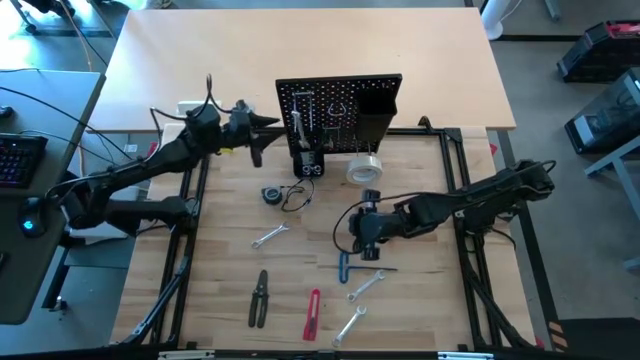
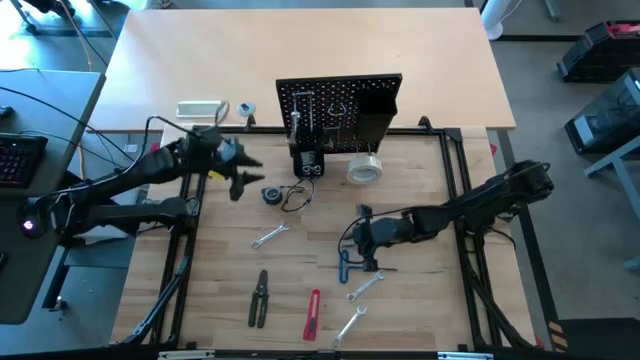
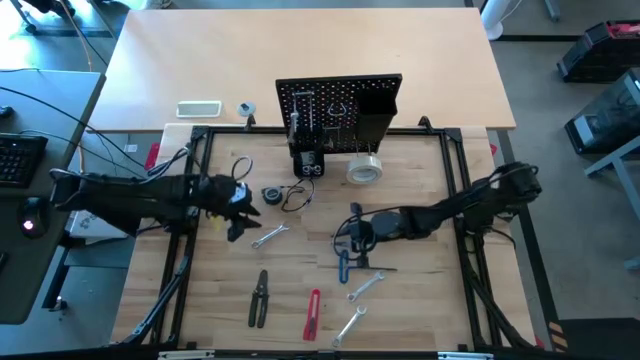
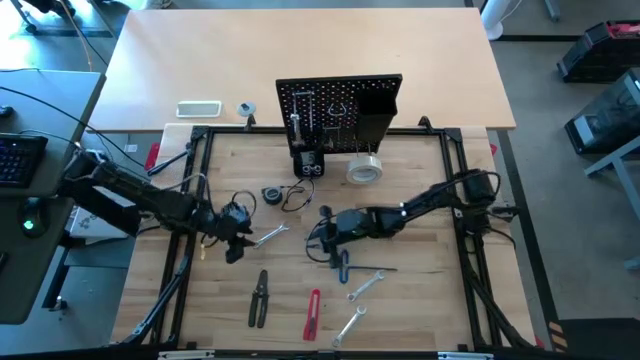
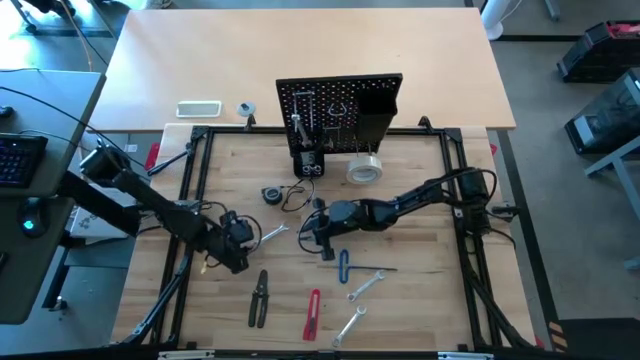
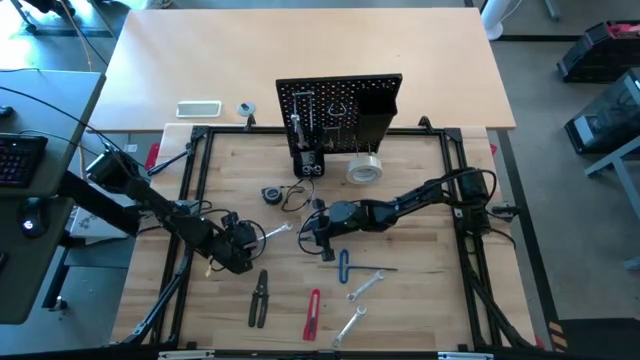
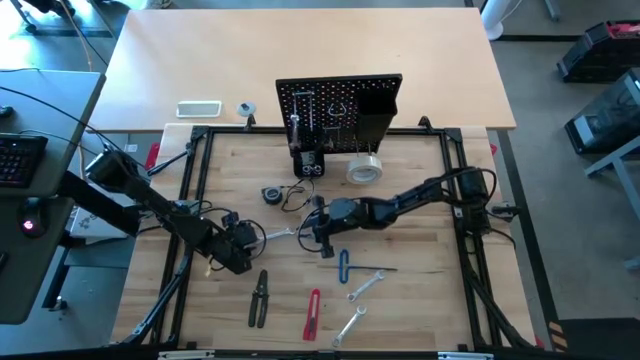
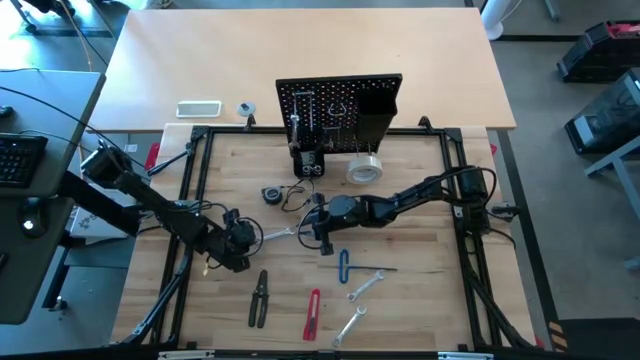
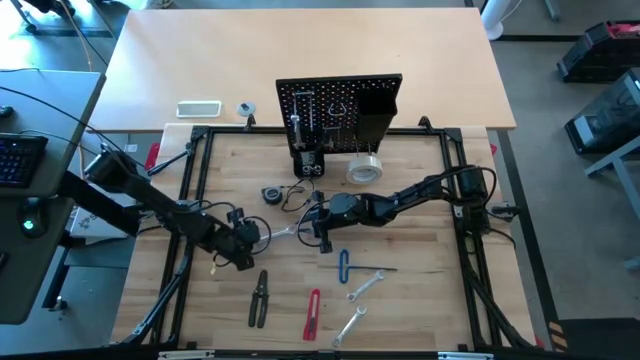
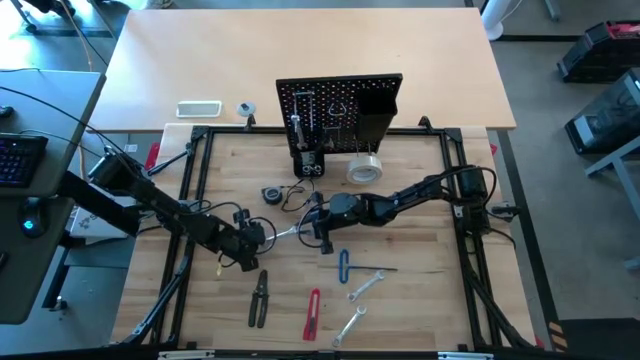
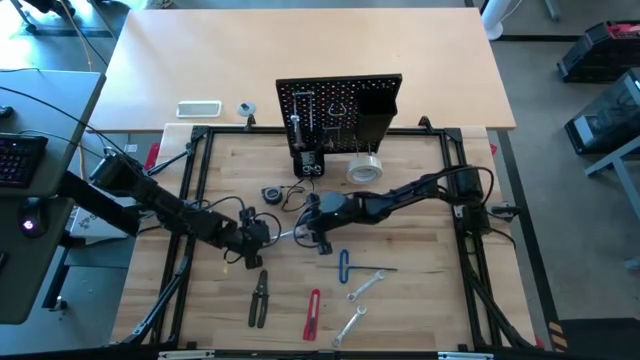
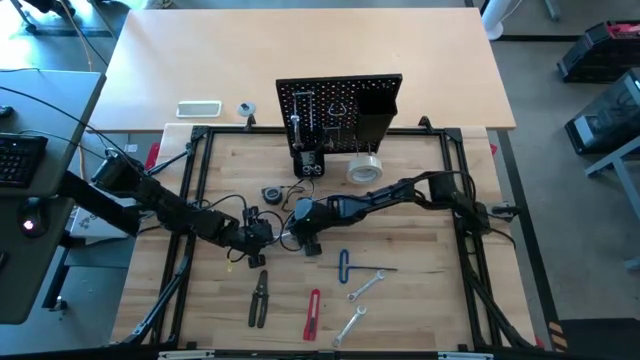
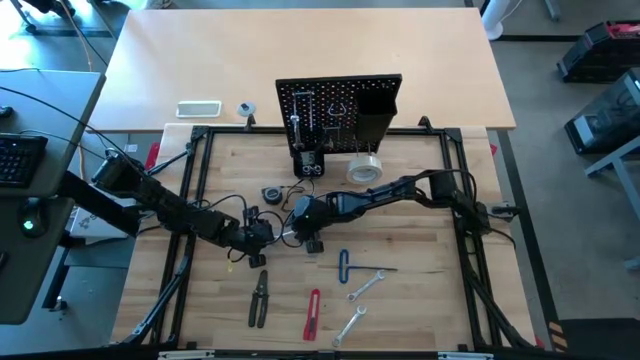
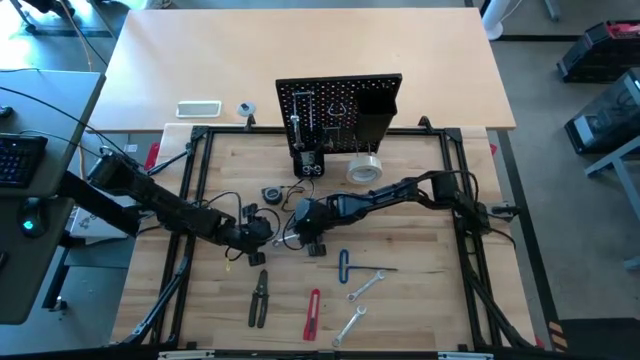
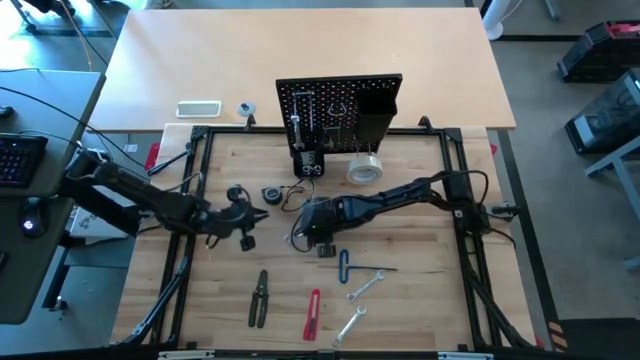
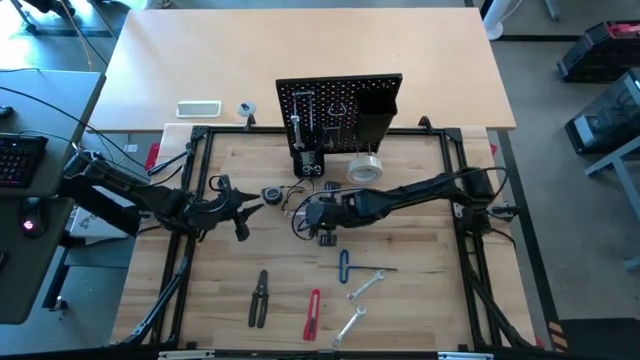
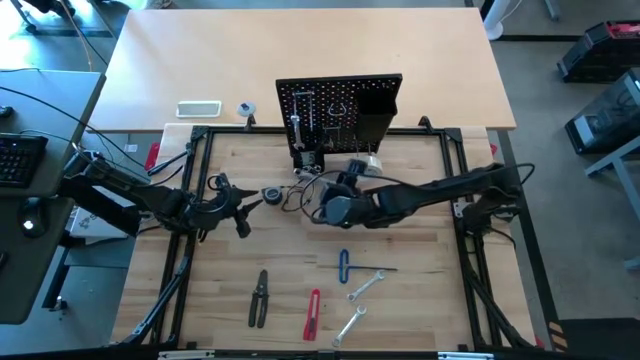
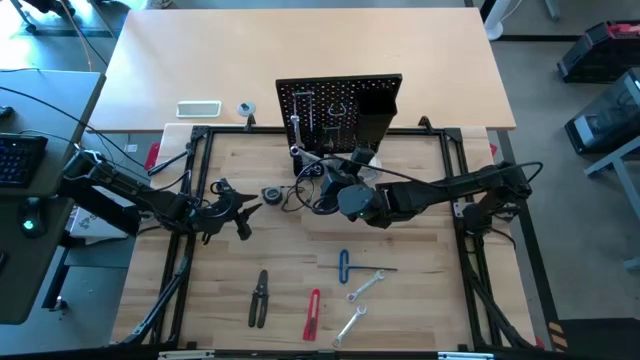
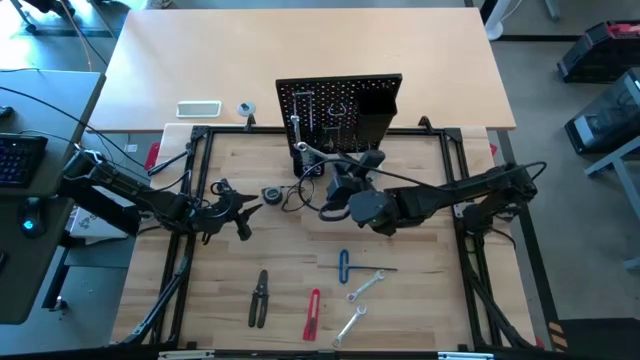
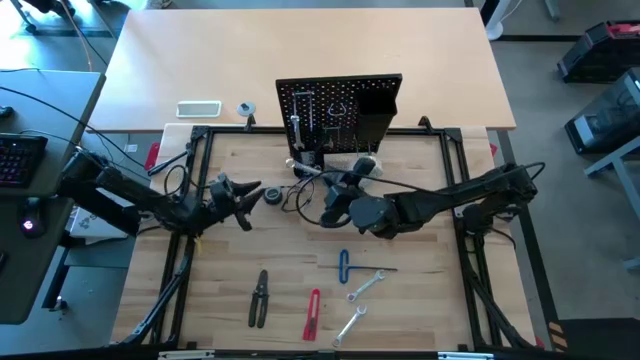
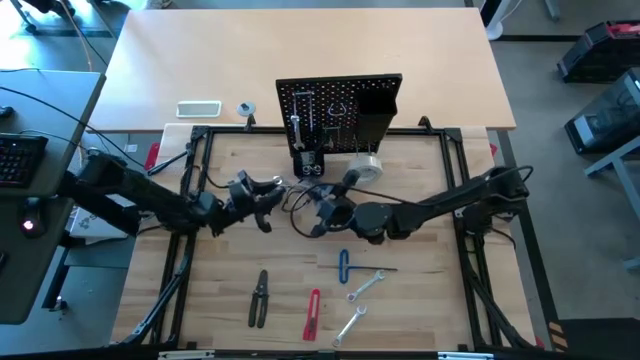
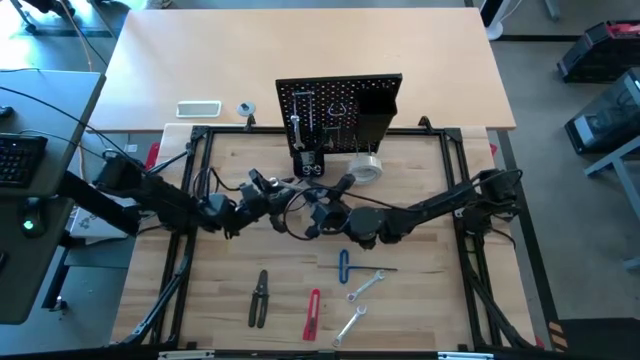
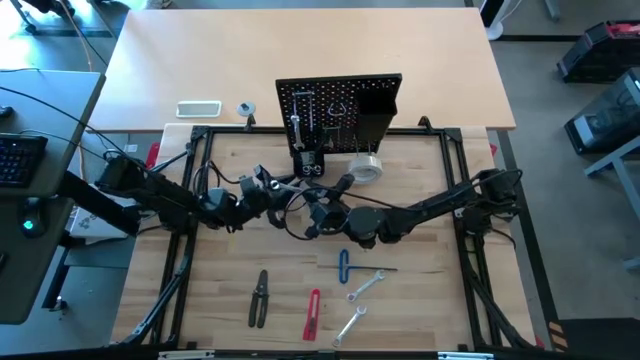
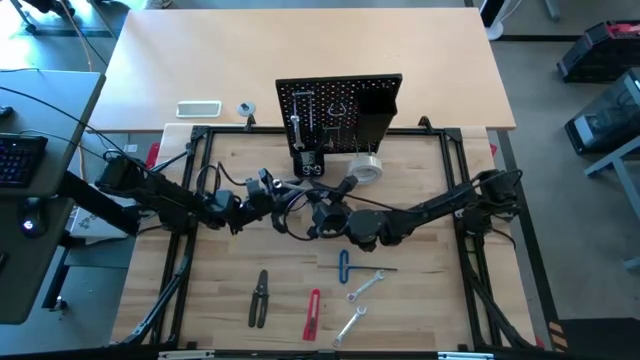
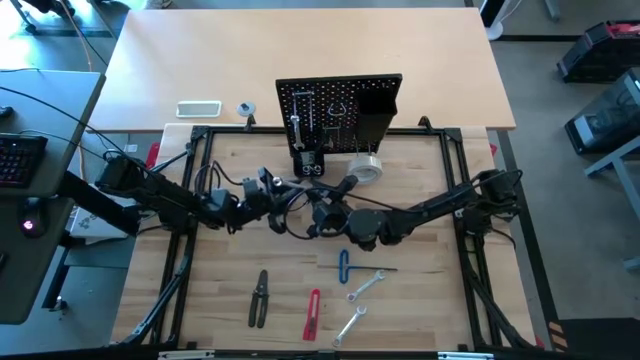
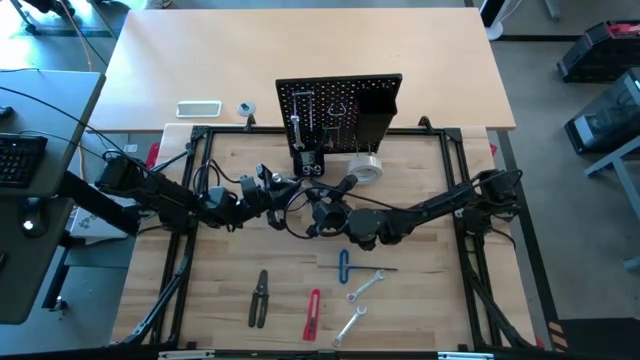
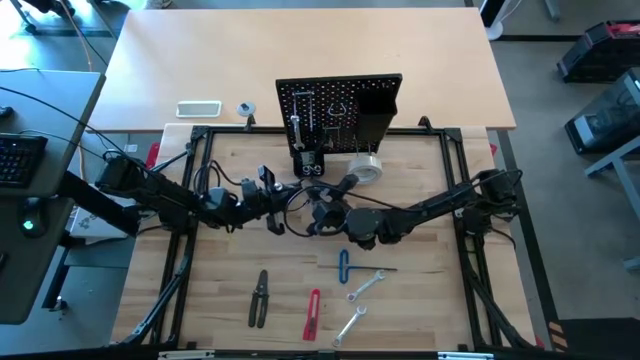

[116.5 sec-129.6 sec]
Task: Hang tools onto peg board
Hang the top left wrench on the pegboard

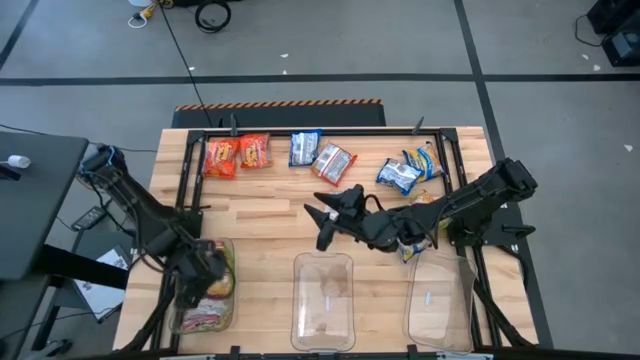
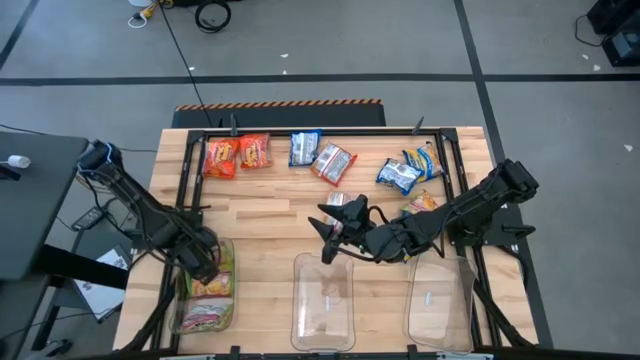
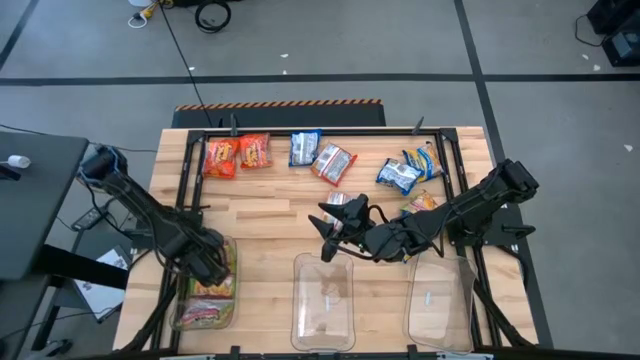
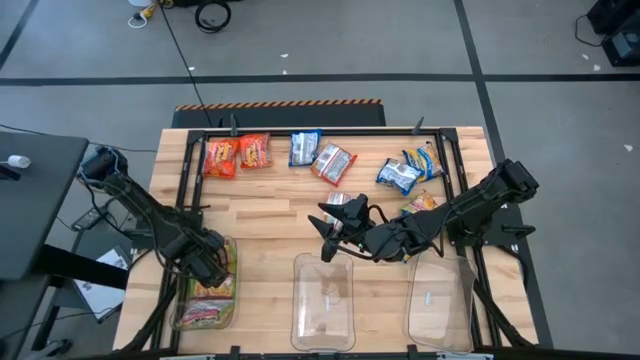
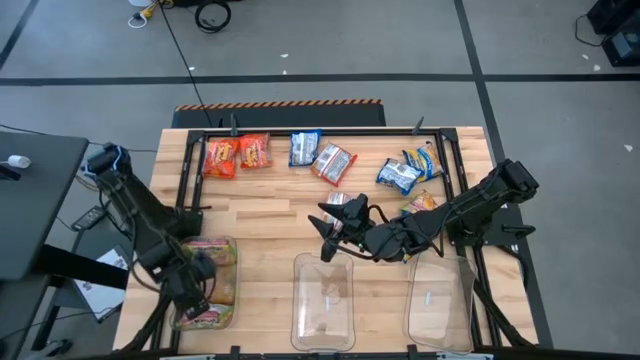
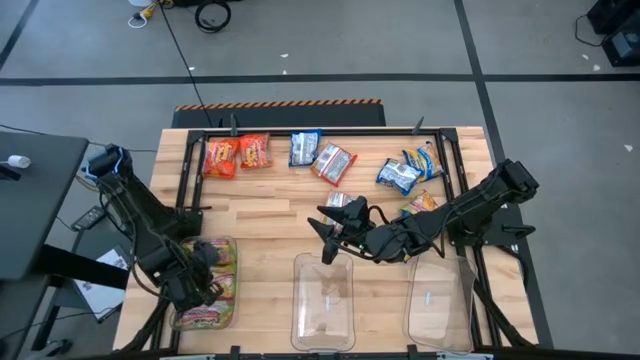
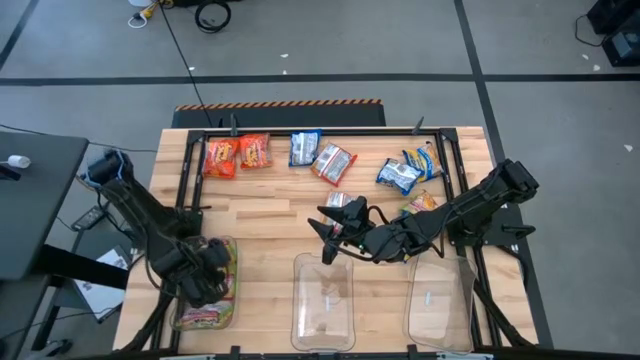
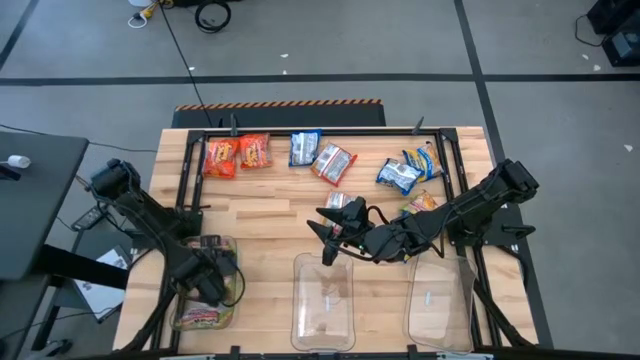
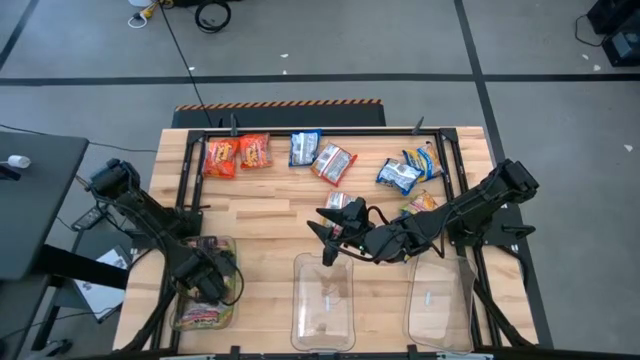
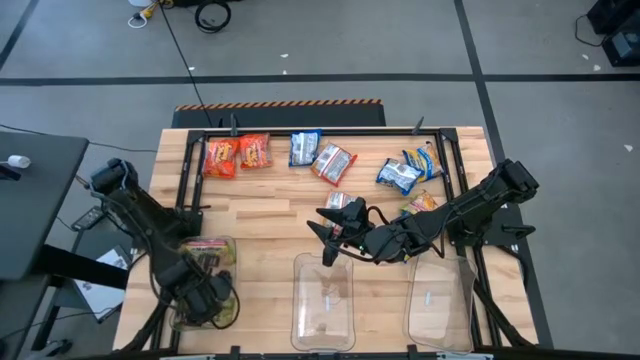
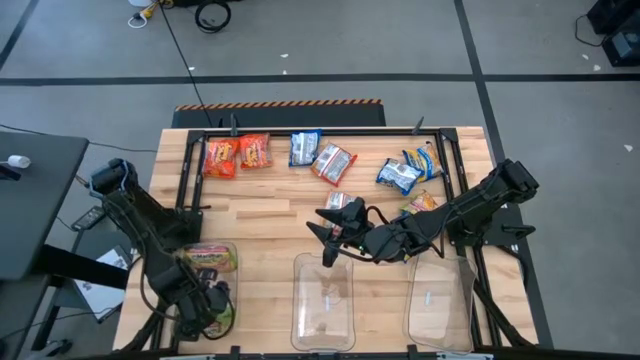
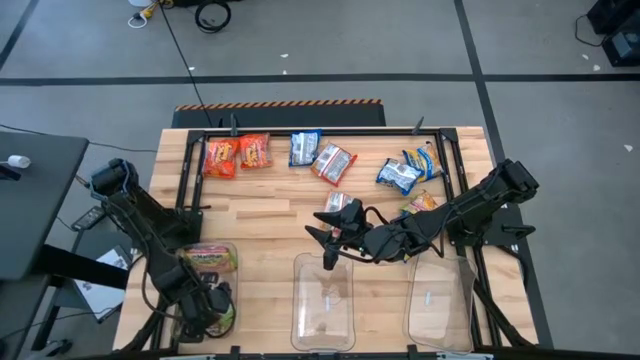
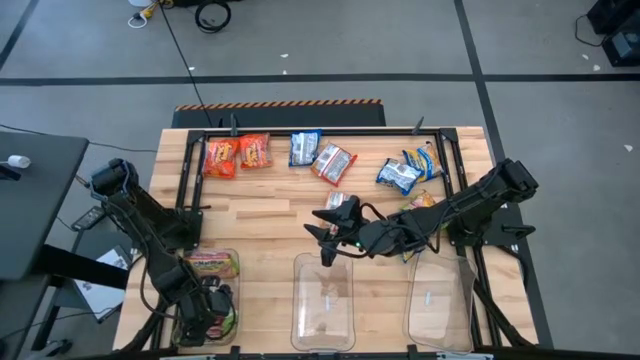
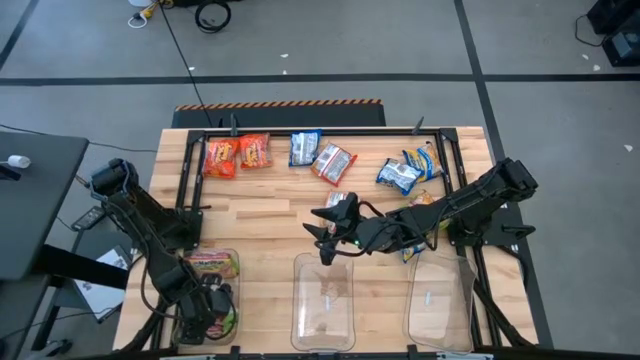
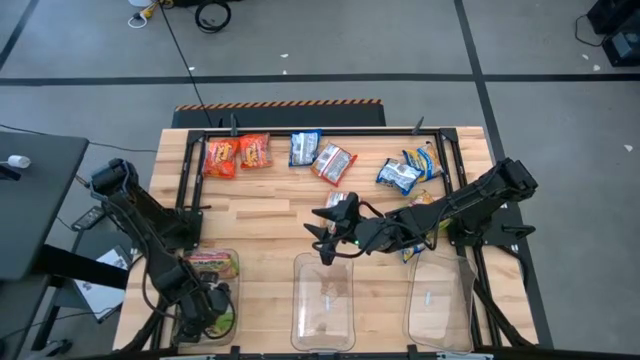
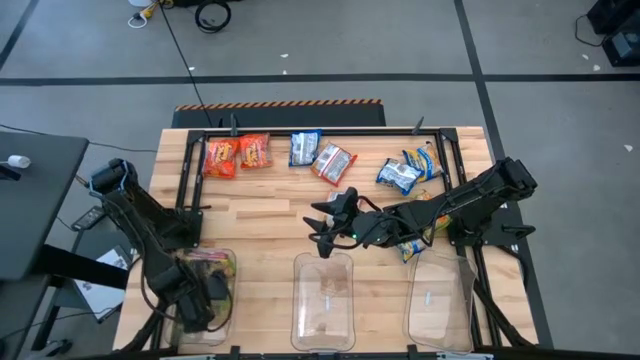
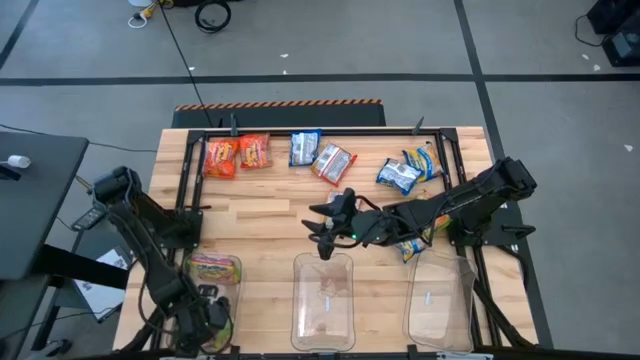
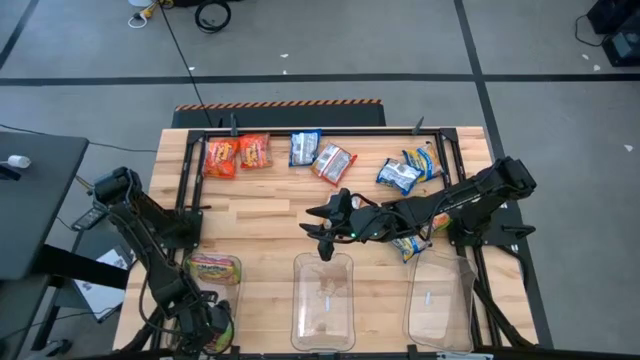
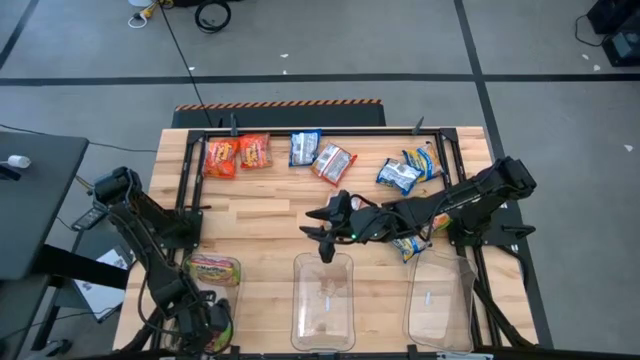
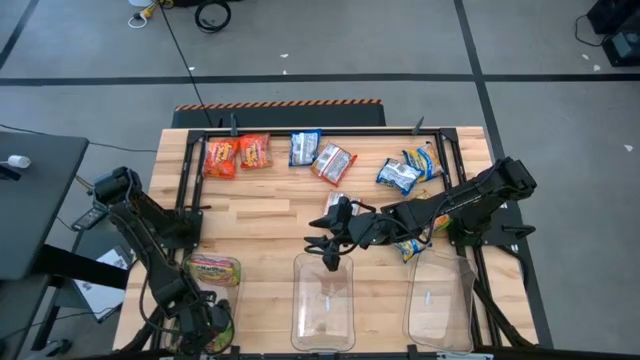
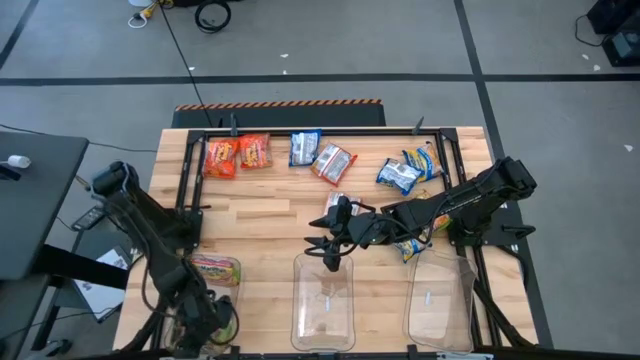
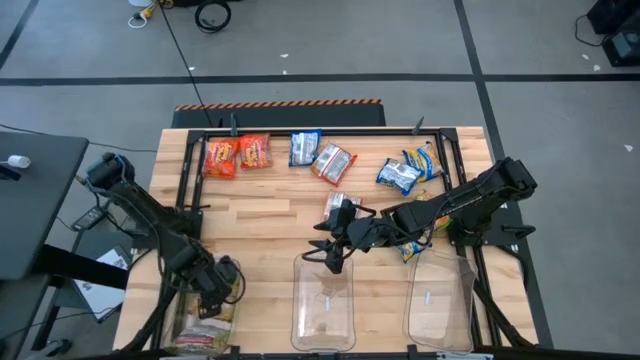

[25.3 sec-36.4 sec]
Task: Sort Maruchan noodles
Adjust the middle green noodle packs in the left transparent bin
